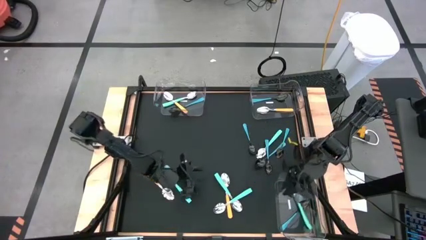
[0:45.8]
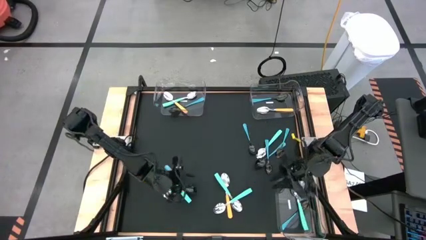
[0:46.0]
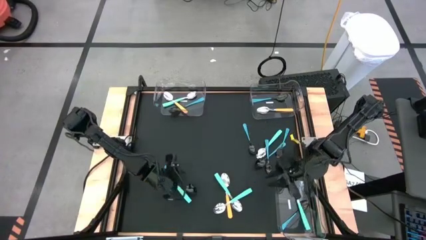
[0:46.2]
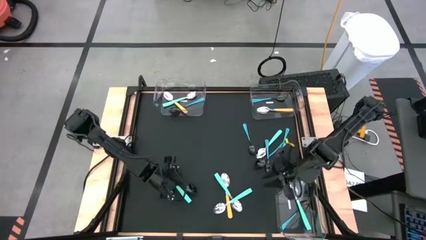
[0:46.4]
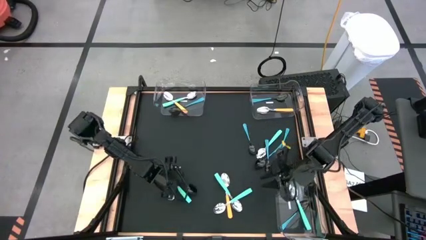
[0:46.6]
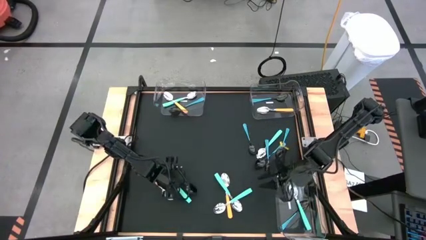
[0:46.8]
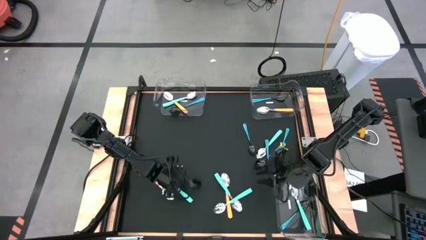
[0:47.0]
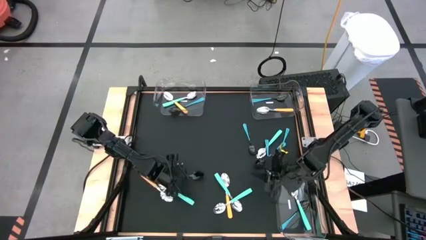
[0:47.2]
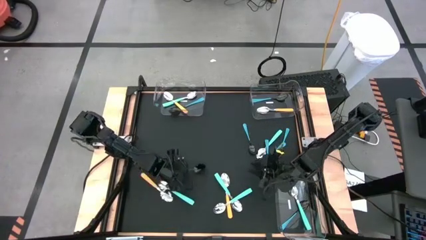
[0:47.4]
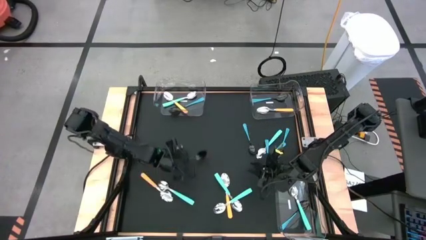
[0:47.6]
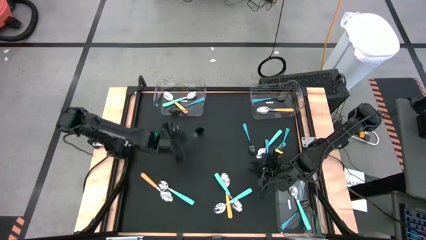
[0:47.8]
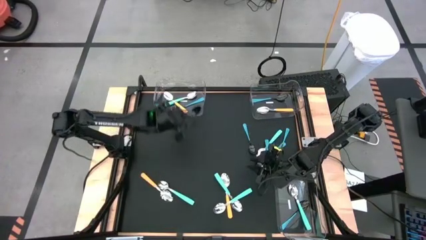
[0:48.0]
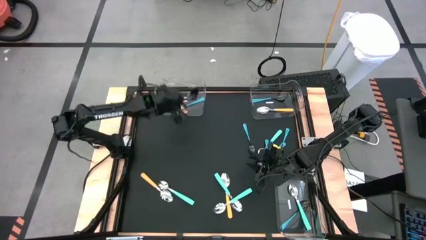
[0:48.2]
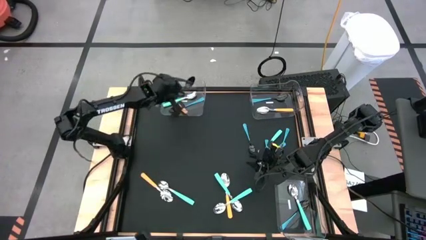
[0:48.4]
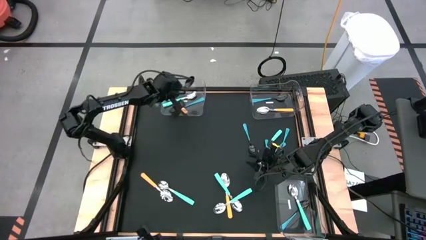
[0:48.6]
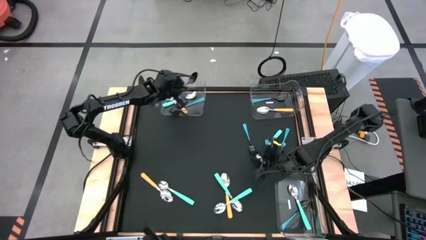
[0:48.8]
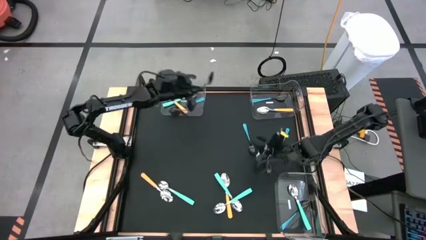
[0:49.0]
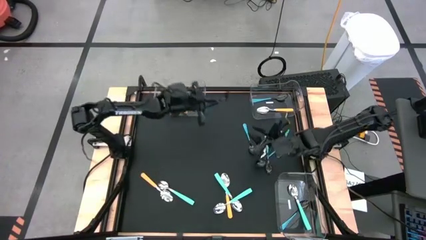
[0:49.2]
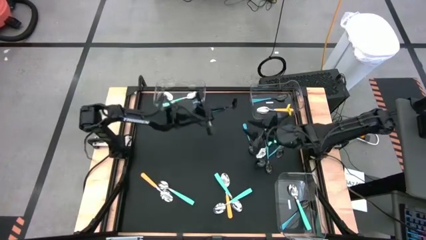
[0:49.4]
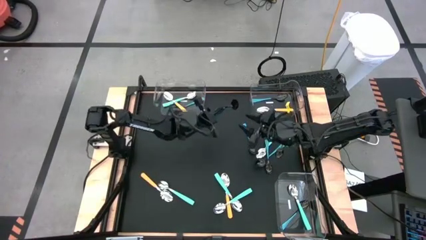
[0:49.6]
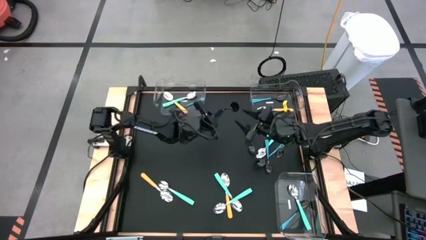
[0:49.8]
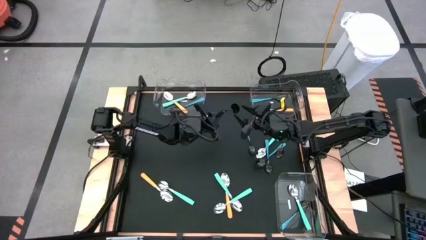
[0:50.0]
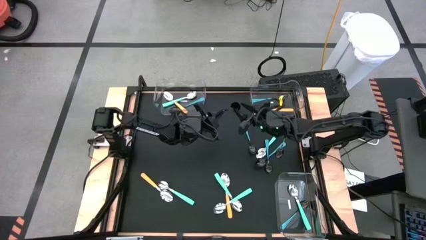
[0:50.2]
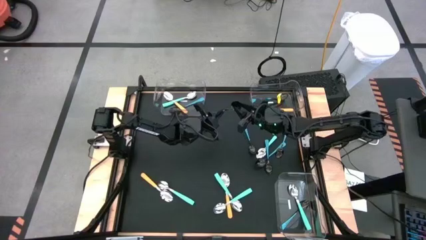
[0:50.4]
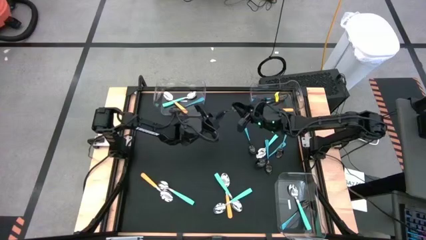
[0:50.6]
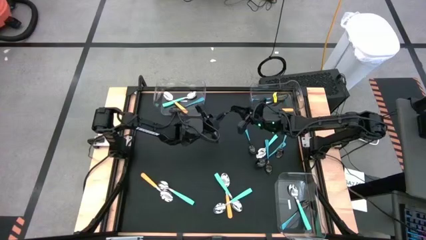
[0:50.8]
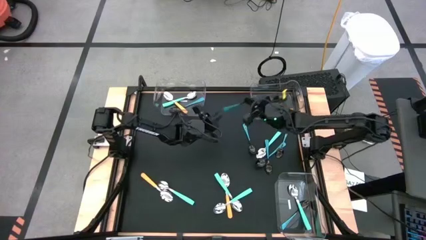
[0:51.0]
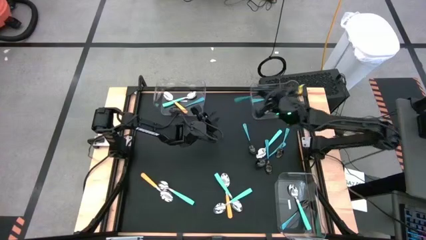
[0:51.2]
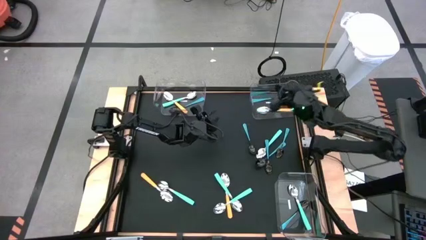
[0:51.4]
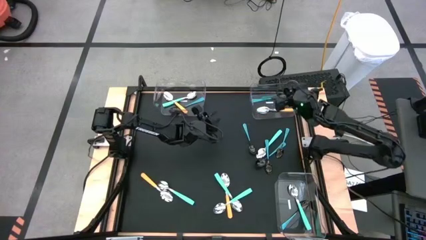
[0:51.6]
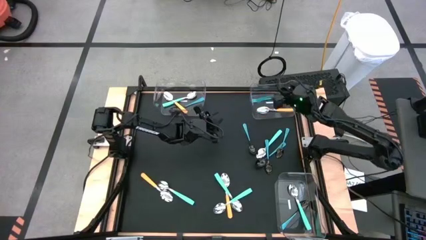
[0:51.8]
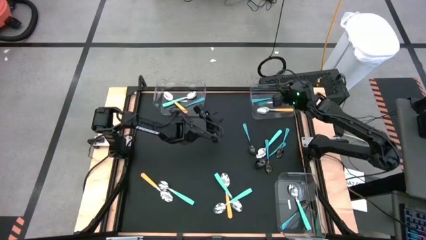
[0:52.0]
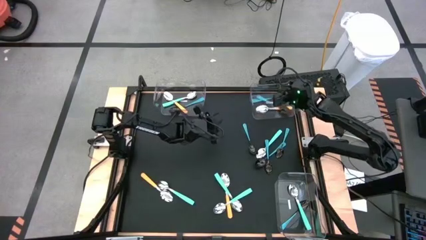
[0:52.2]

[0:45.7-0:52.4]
Task: Sort silverware by color (type)
Put the blue spoon into the top right transparent bin

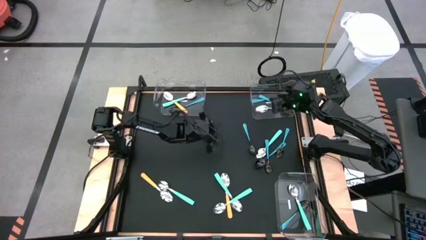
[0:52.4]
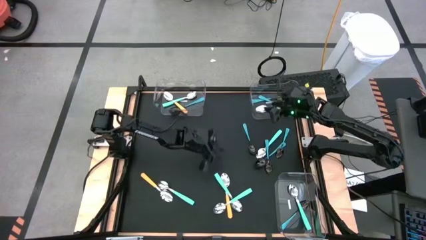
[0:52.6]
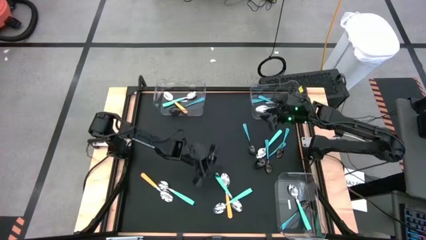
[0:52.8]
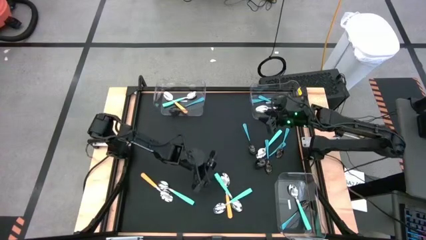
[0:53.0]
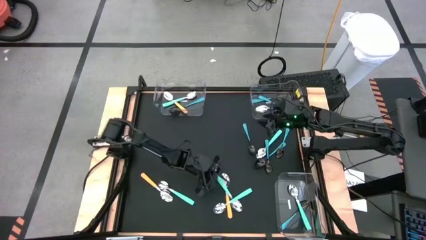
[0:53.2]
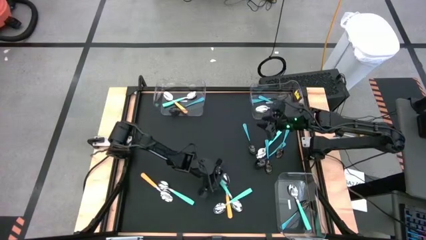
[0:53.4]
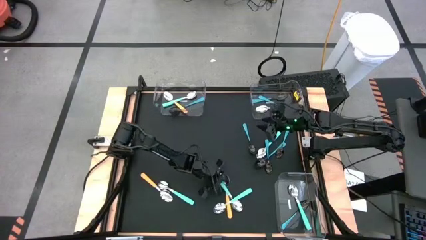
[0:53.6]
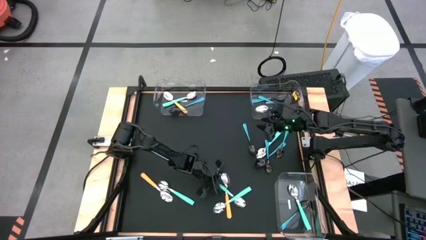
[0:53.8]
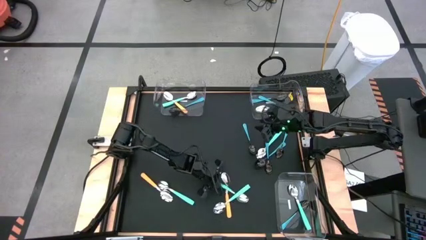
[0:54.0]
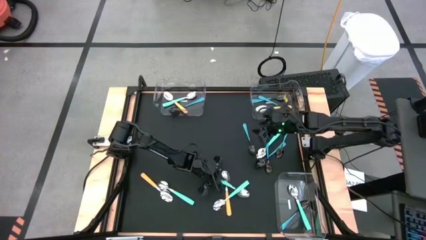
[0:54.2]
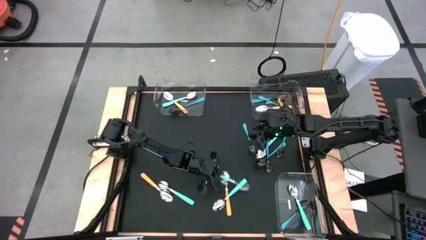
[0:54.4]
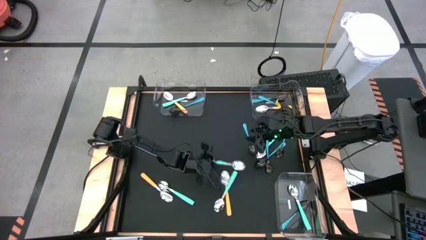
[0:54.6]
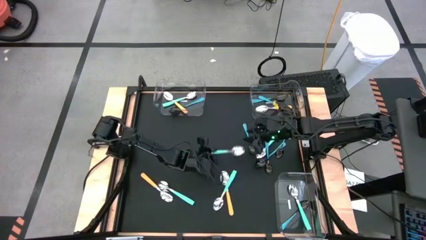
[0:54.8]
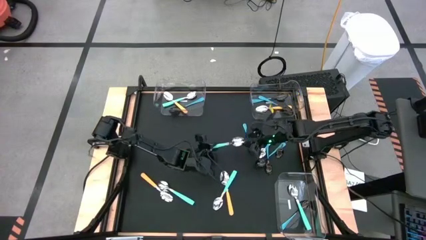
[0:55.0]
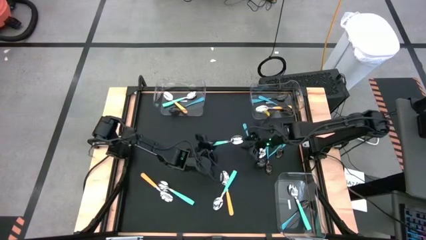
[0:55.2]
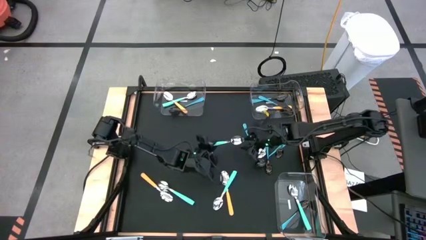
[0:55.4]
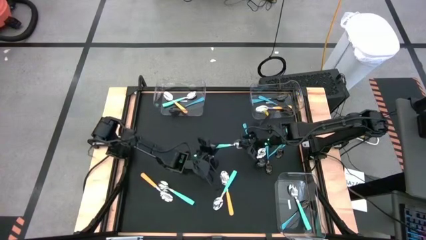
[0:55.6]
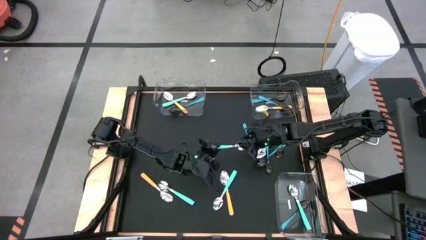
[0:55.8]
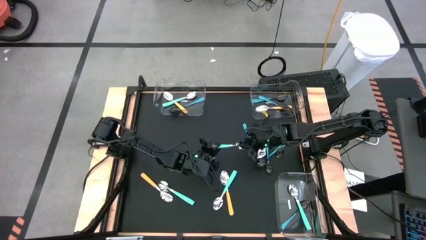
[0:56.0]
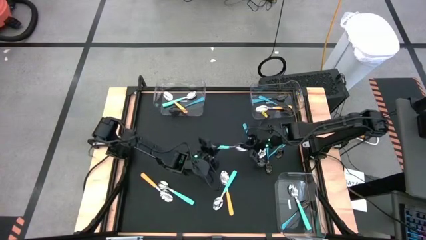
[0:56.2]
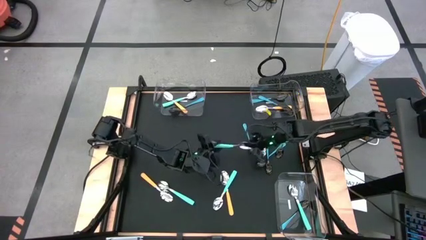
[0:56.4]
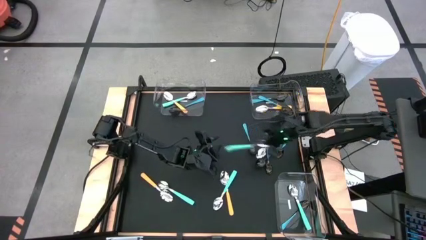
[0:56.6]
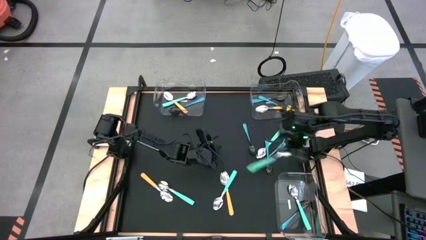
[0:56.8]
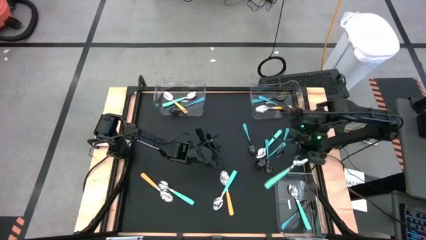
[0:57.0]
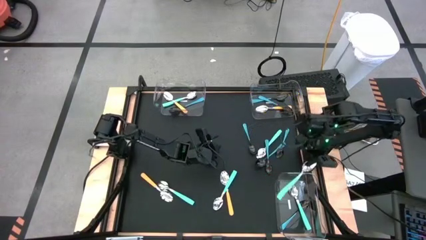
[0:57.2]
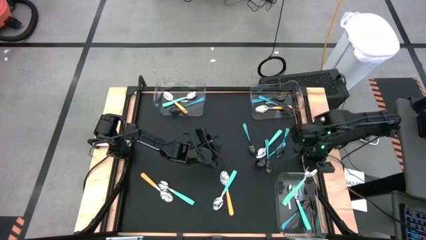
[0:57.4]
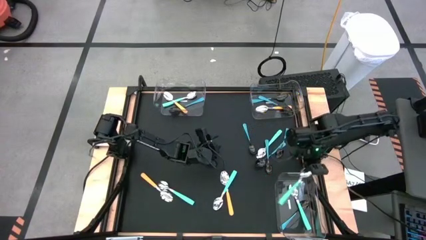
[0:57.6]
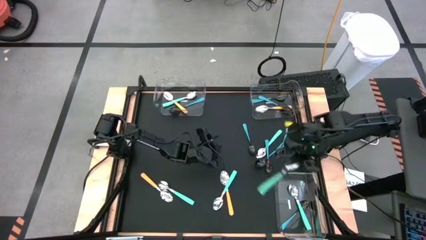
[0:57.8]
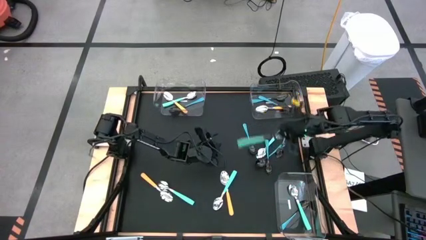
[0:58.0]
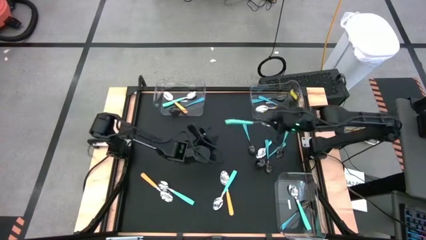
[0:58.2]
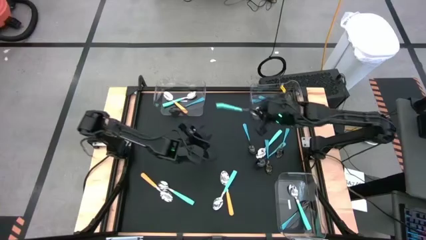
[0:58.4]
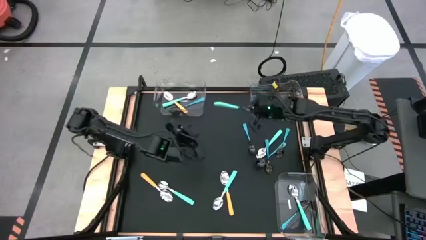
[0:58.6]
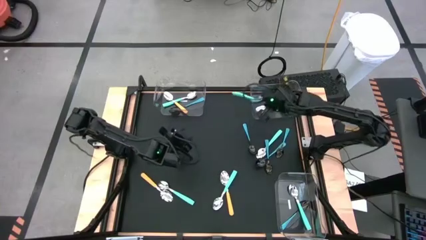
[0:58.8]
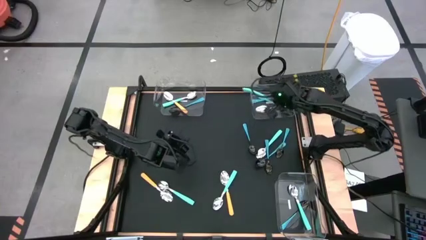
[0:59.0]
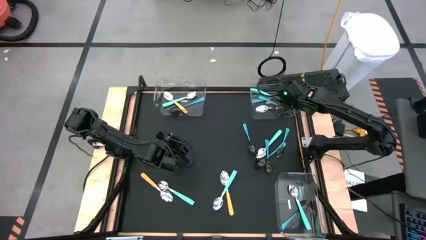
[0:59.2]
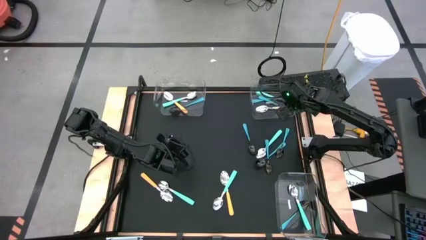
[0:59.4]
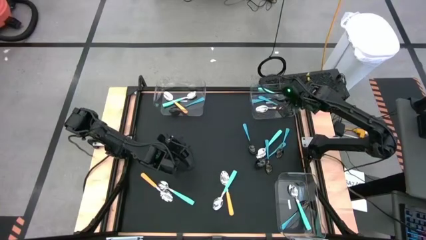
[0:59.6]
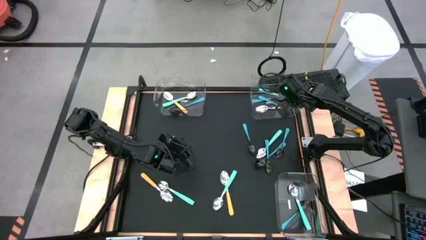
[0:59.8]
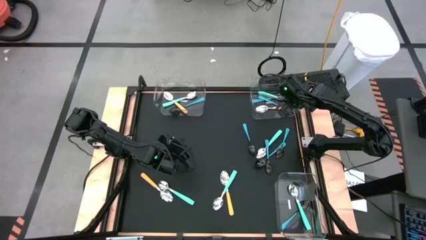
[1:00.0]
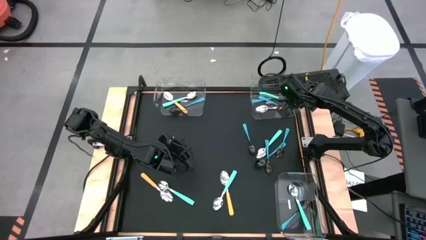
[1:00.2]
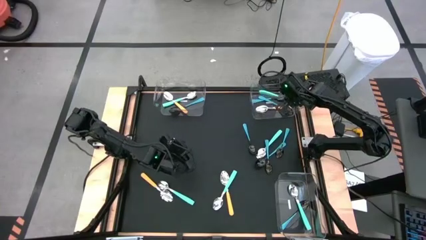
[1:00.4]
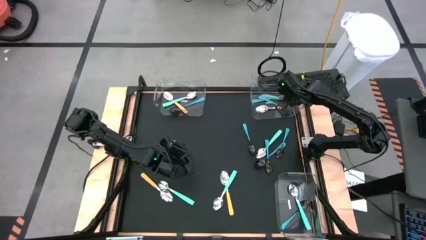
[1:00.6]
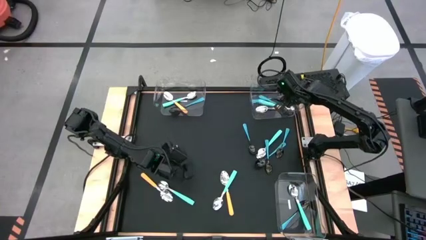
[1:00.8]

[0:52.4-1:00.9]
Put the light blue spoon into the top right transparent bin
